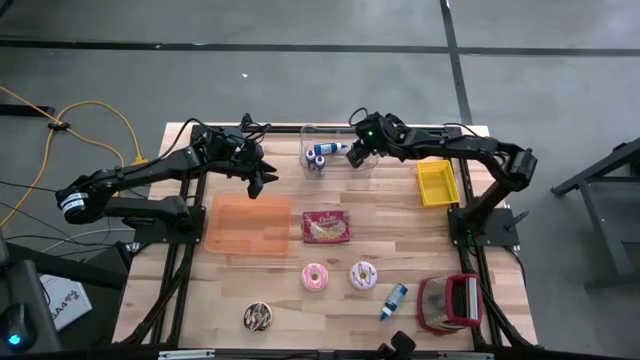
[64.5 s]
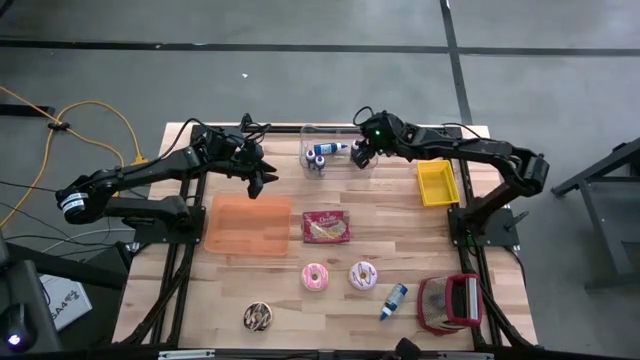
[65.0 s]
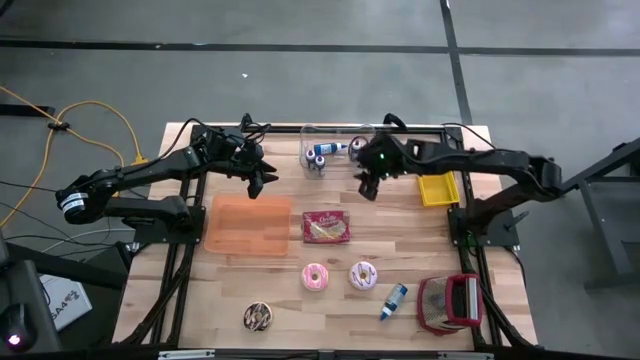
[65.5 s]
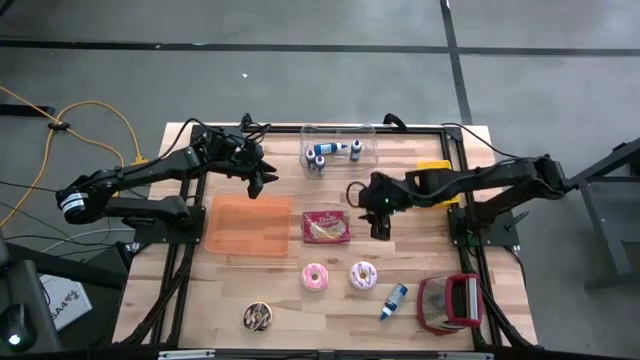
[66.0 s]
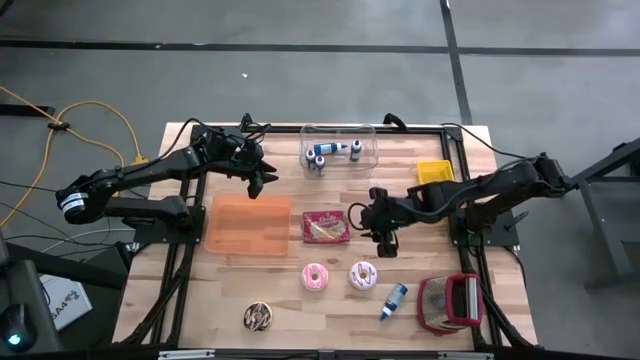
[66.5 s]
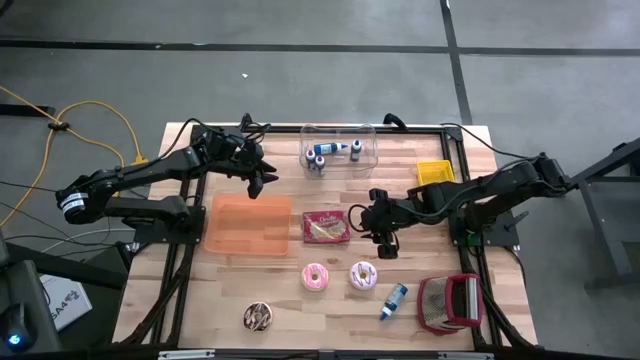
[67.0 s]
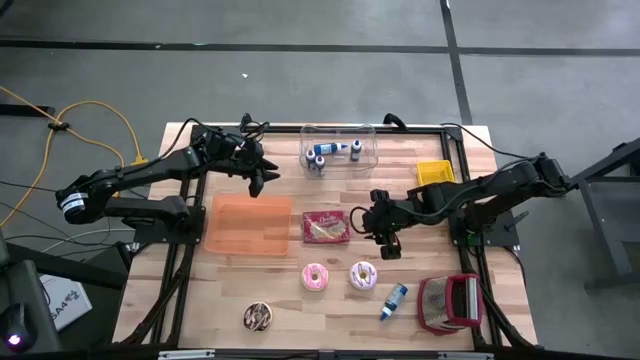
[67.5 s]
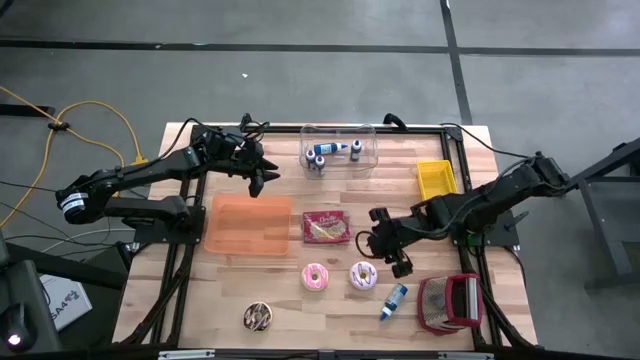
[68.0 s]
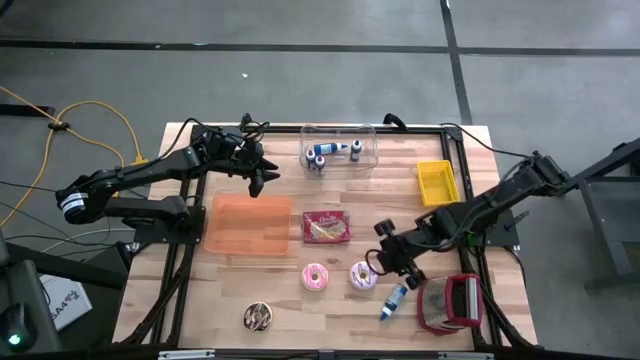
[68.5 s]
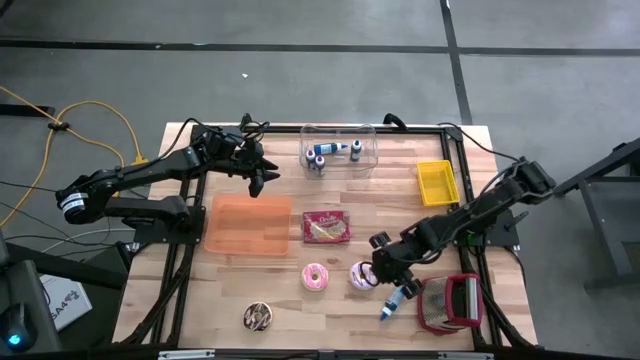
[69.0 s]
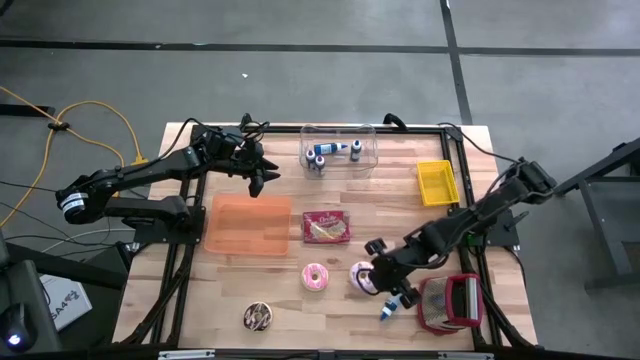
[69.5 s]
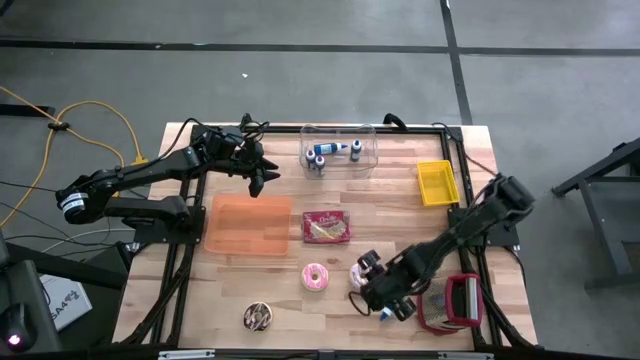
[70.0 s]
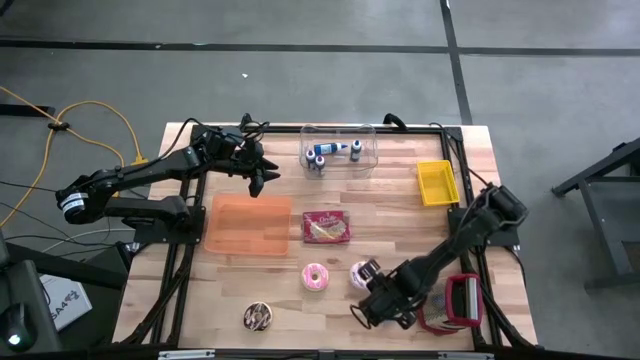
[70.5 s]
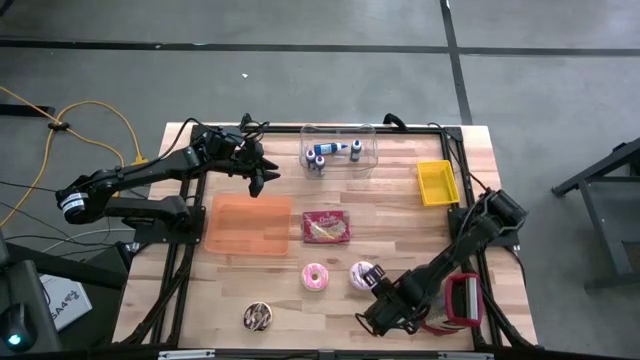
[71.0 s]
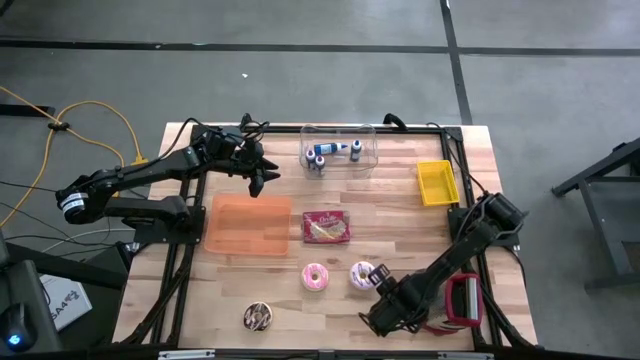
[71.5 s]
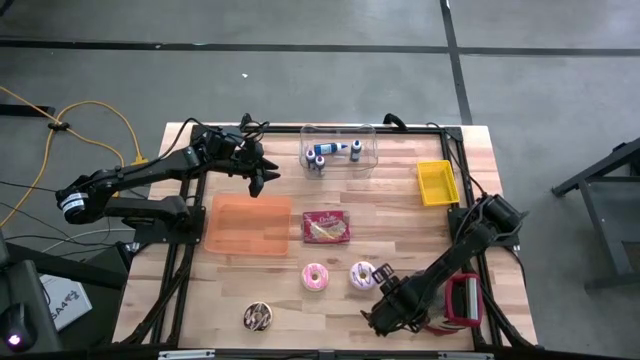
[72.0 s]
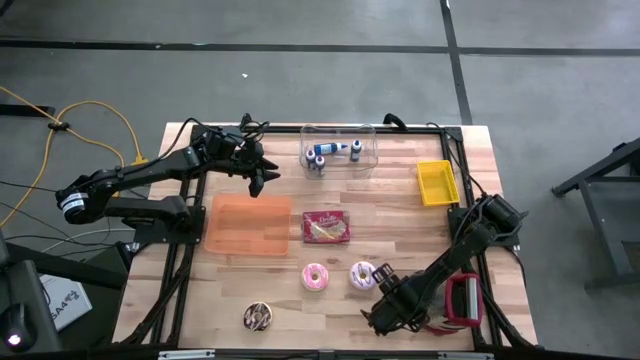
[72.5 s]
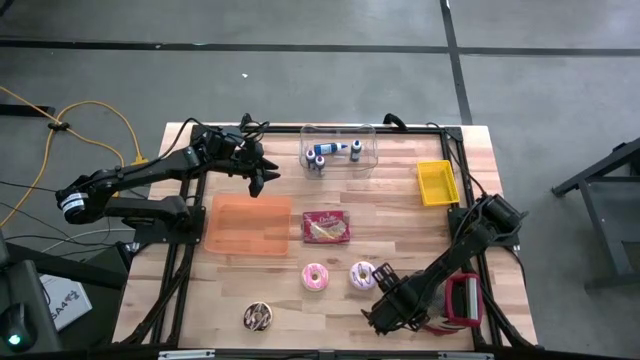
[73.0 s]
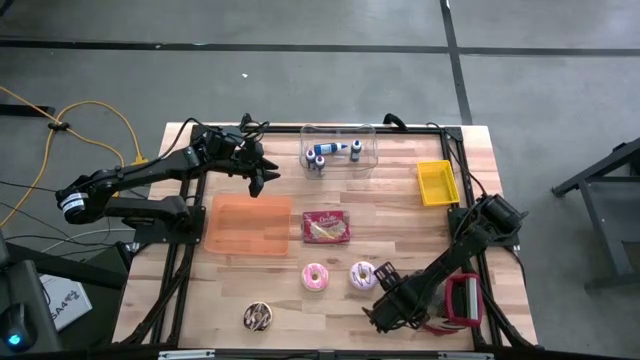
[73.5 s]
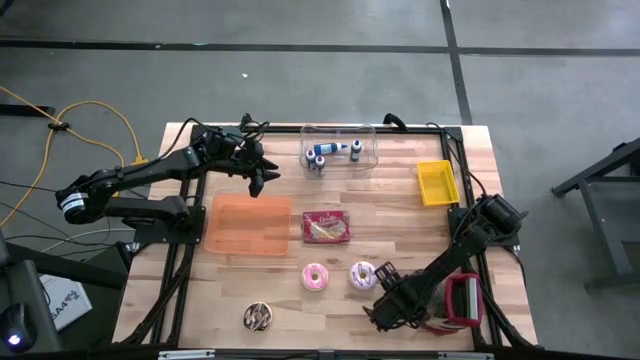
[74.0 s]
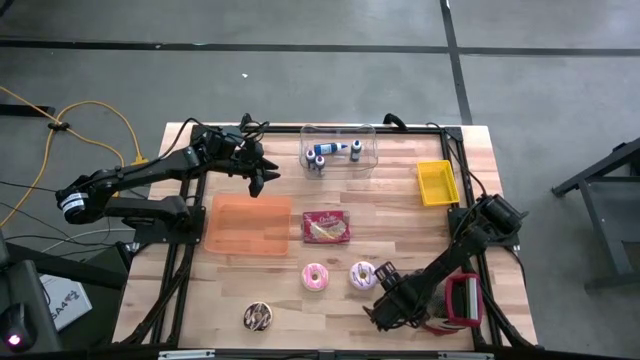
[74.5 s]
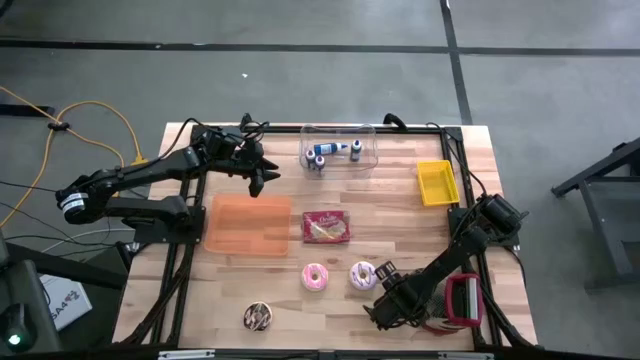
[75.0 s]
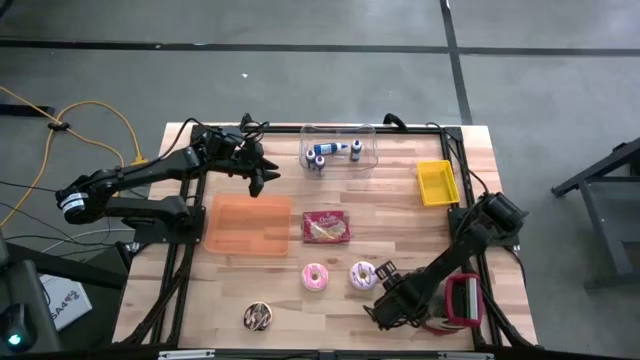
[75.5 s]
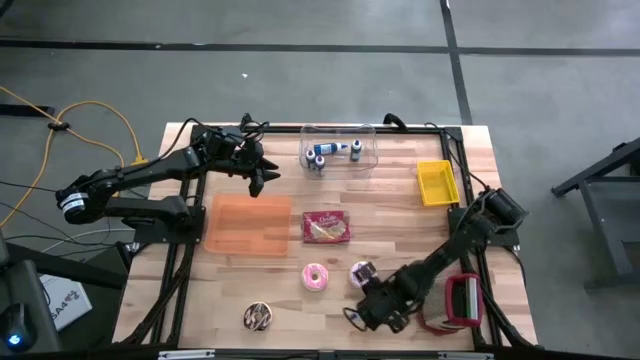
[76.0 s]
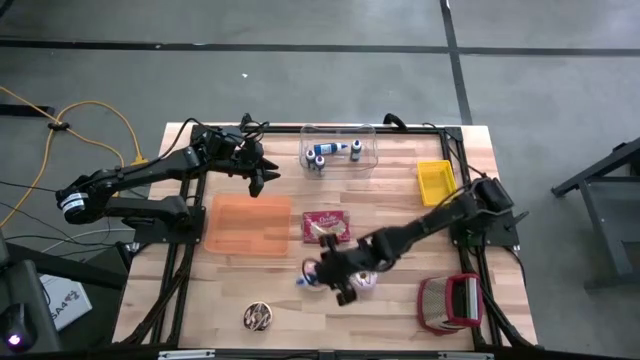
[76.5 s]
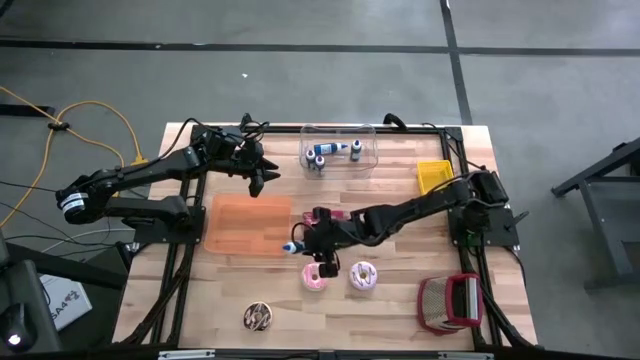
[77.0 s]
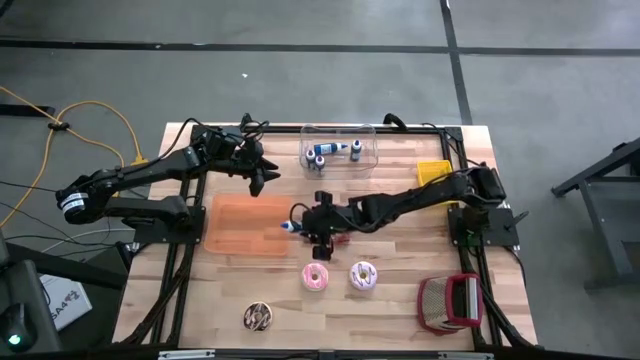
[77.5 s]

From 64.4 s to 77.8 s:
Put the top blue coloring bottle into the transparent bin

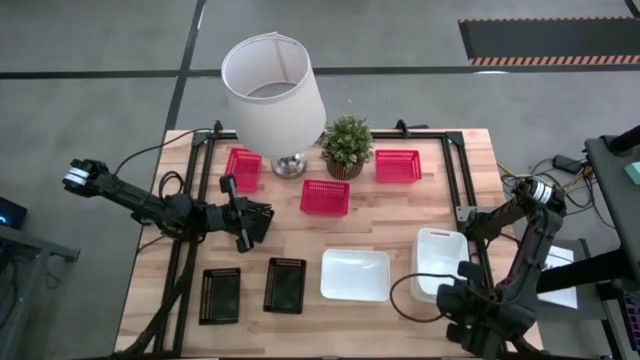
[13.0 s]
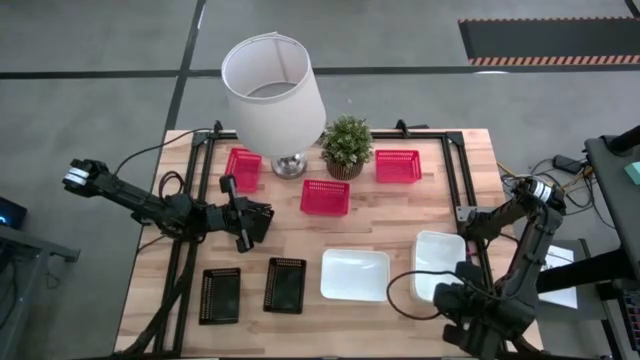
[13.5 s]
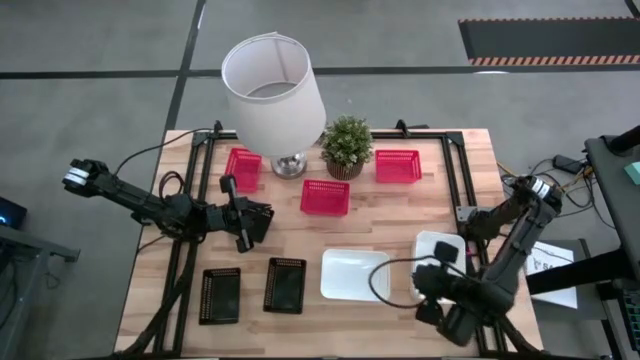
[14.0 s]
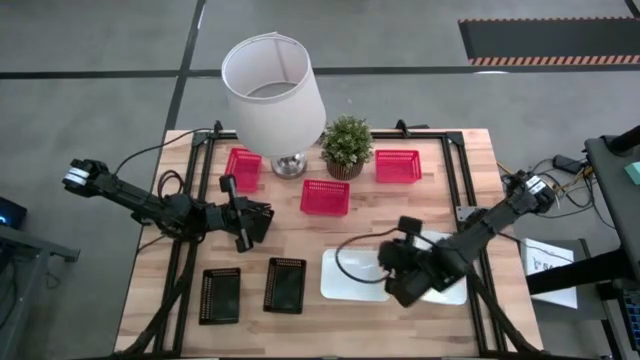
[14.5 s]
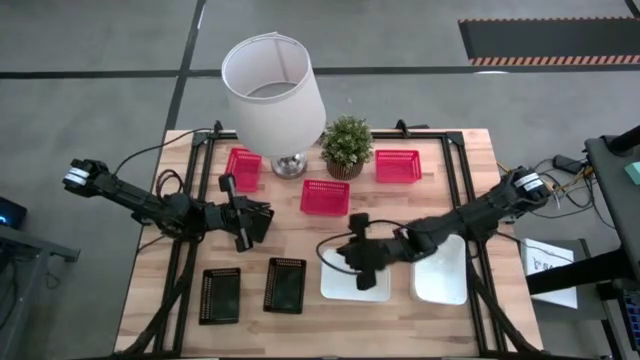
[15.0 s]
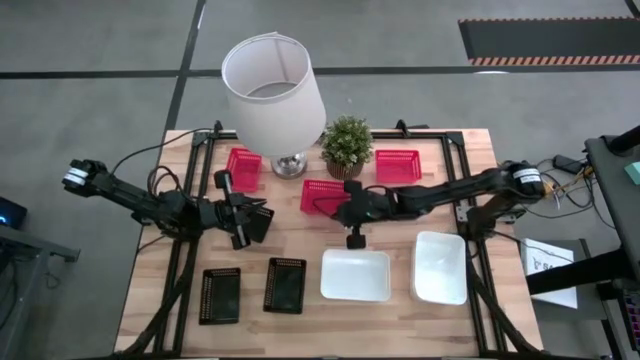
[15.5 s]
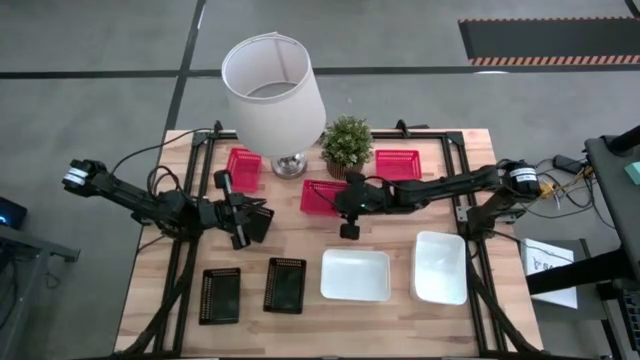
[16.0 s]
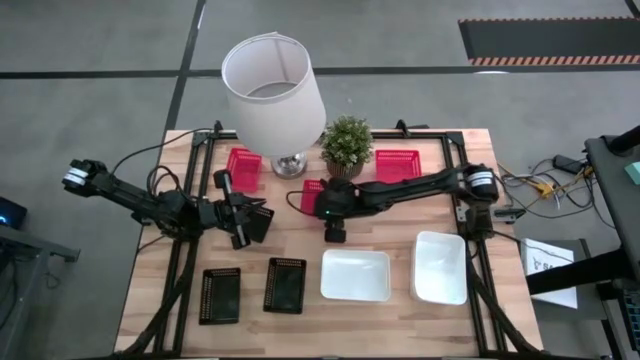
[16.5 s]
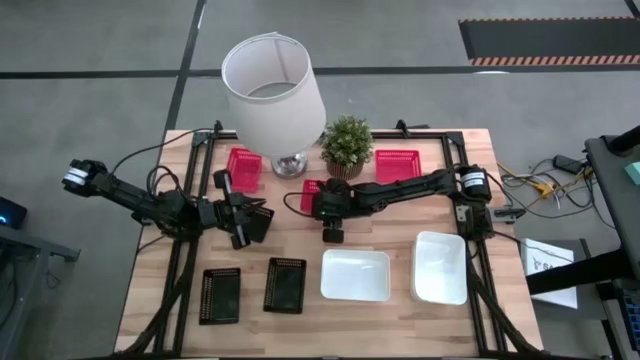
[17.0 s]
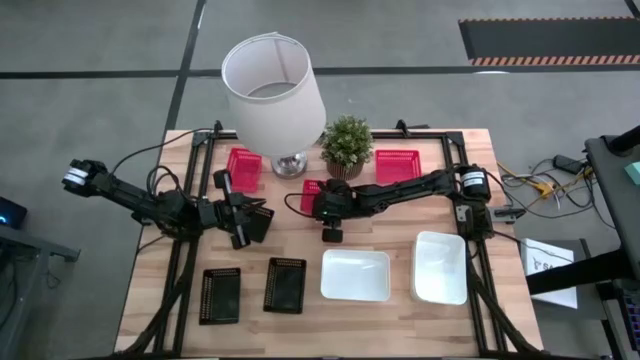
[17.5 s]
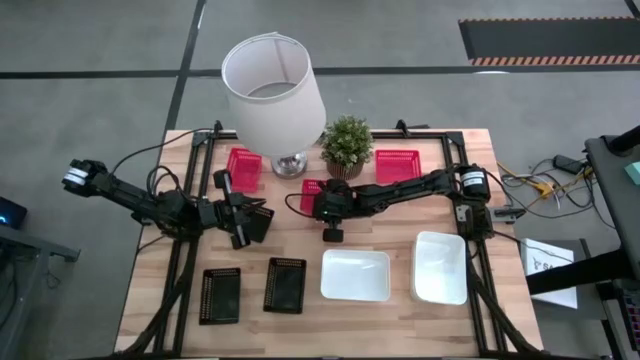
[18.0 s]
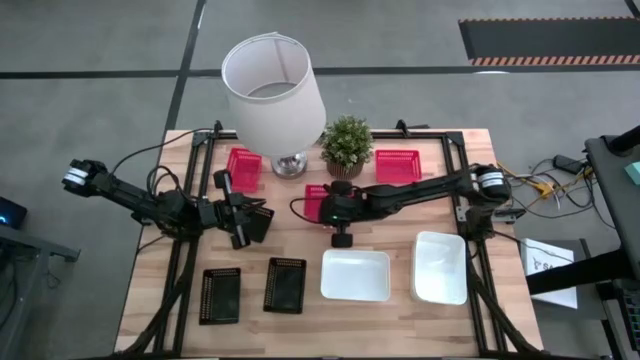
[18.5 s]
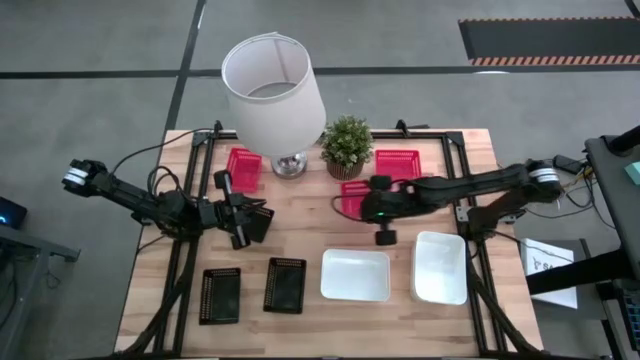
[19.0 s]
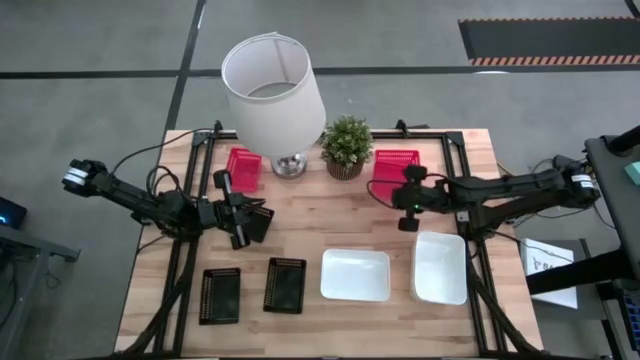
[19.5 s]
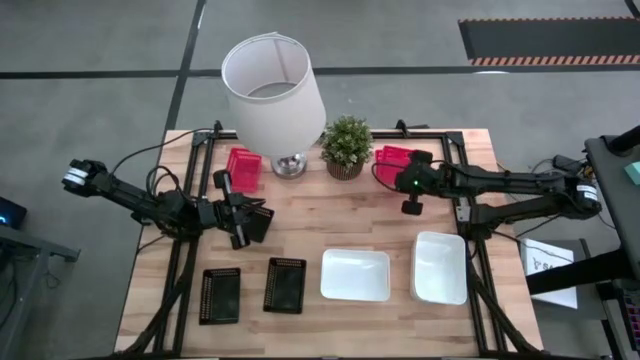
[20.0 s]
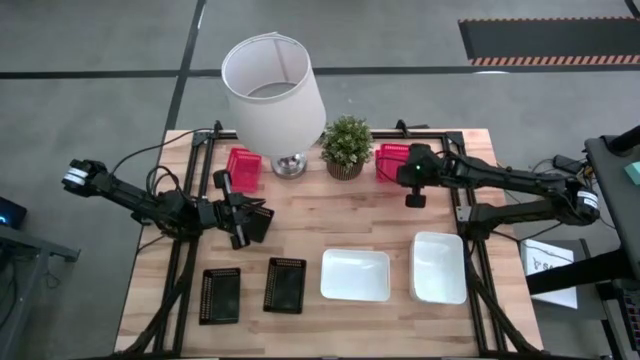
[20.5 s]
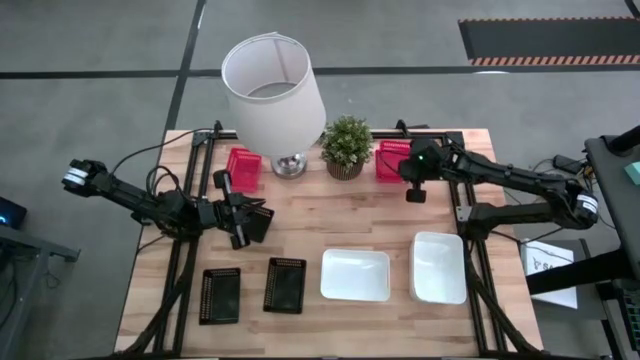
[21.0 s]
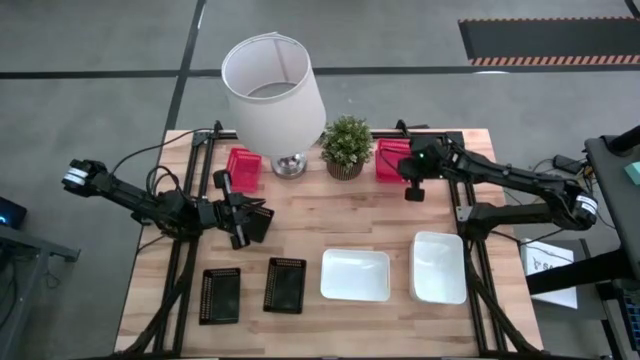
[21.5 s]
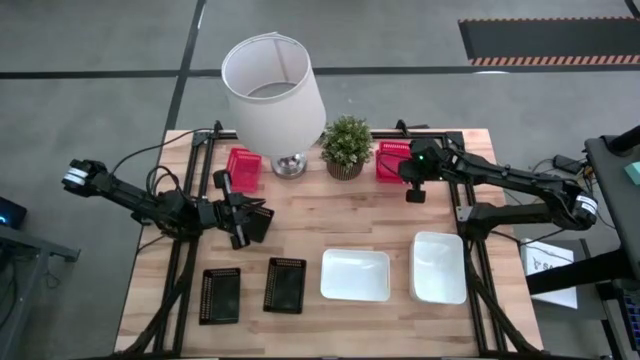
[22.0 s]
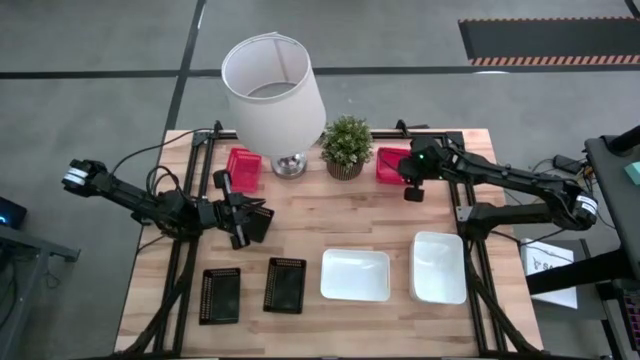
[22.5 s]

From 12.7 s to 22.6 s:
Stack the middle red bin on the right red bin
